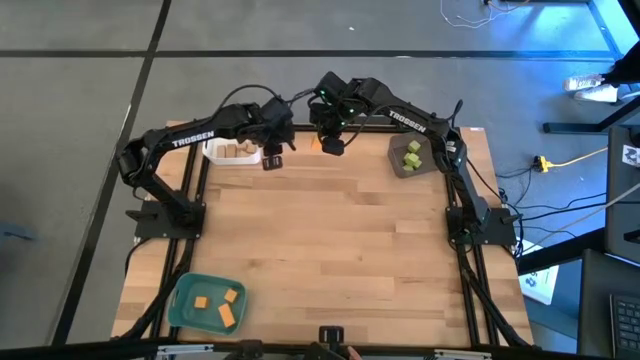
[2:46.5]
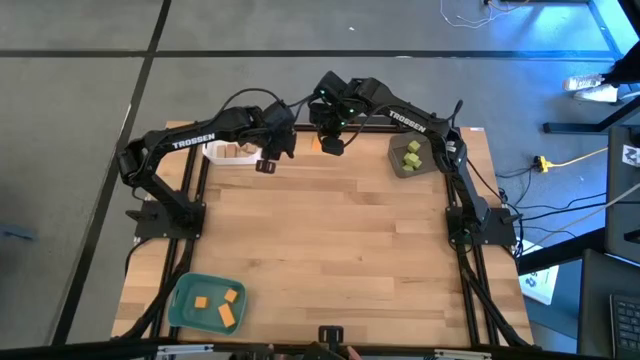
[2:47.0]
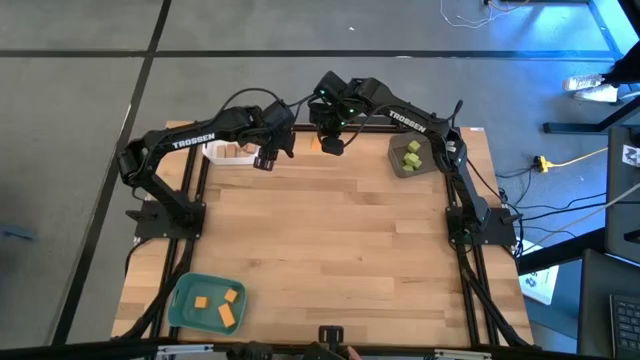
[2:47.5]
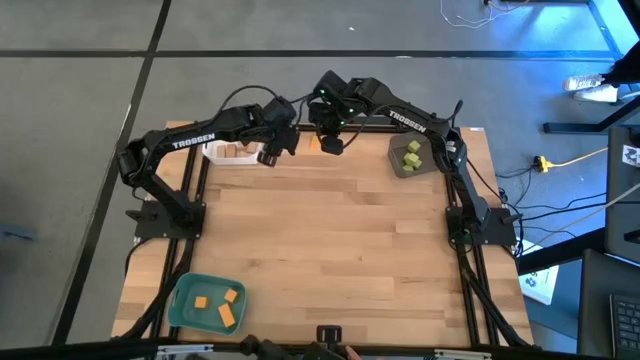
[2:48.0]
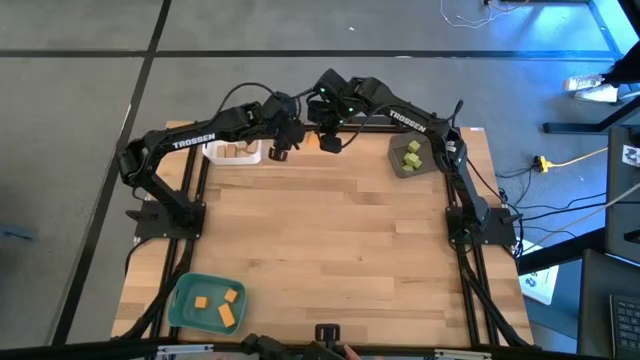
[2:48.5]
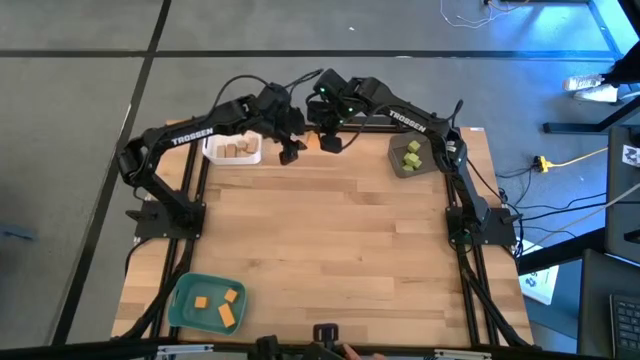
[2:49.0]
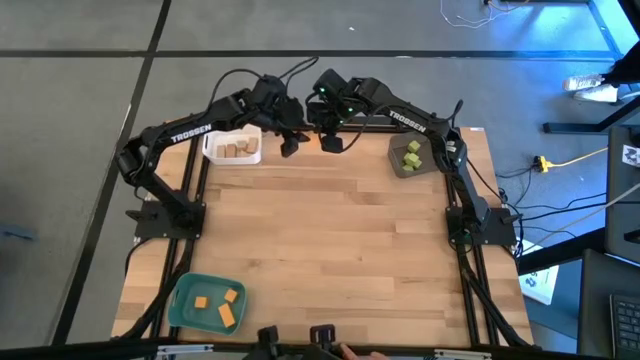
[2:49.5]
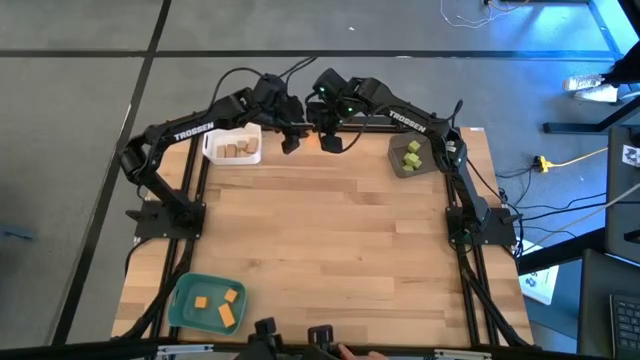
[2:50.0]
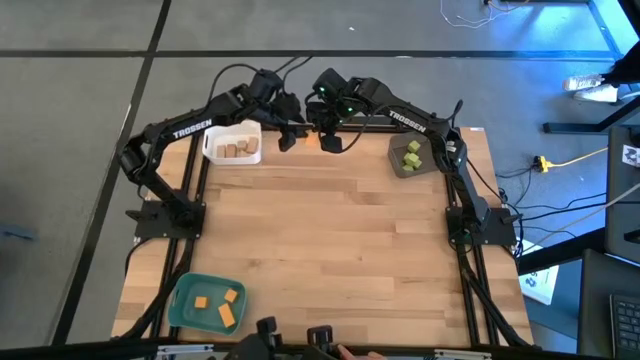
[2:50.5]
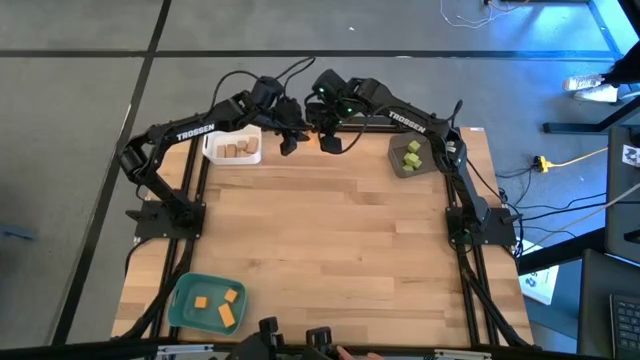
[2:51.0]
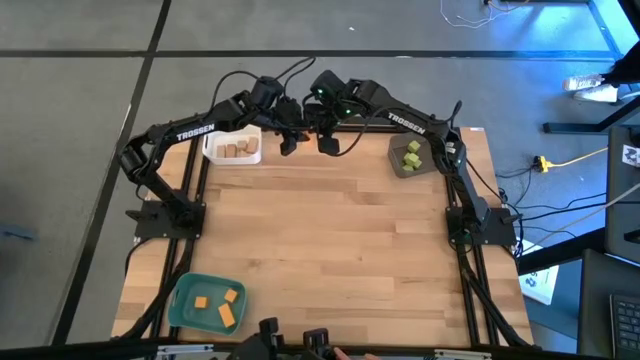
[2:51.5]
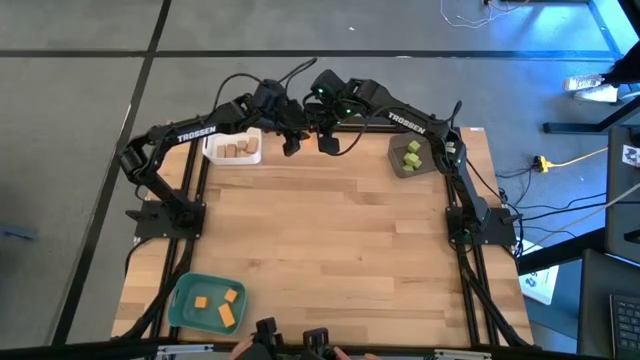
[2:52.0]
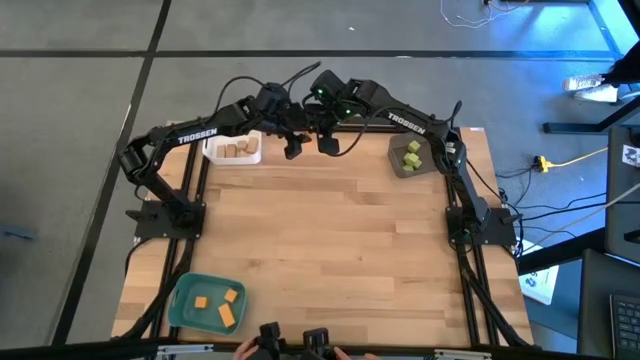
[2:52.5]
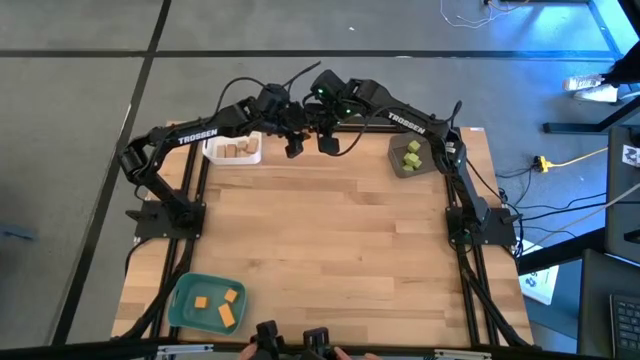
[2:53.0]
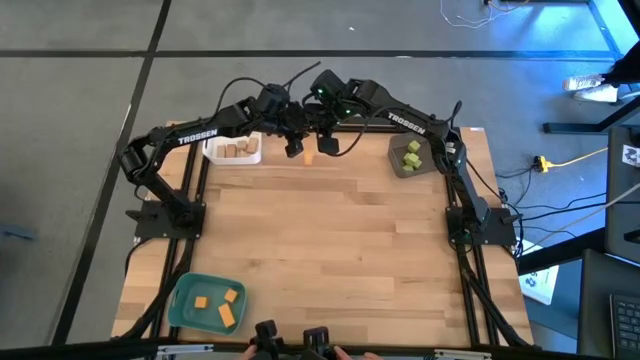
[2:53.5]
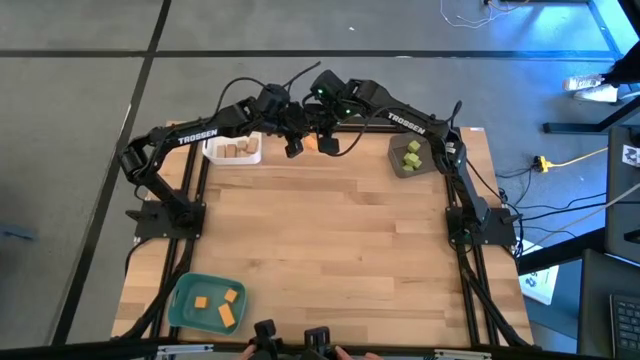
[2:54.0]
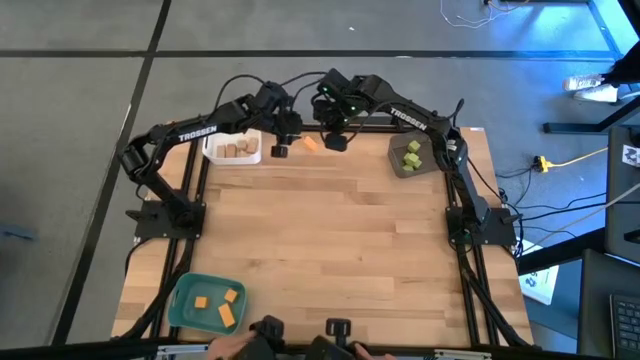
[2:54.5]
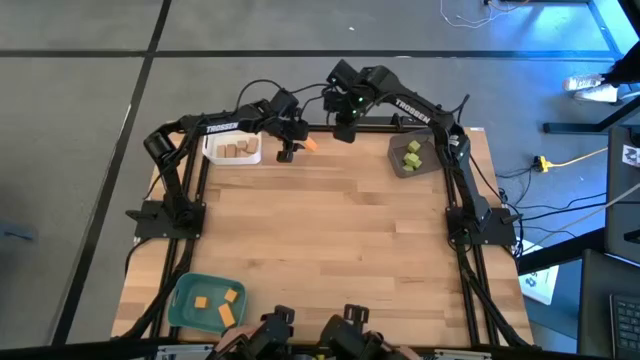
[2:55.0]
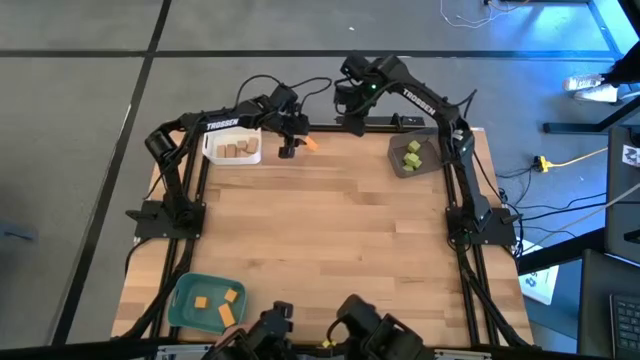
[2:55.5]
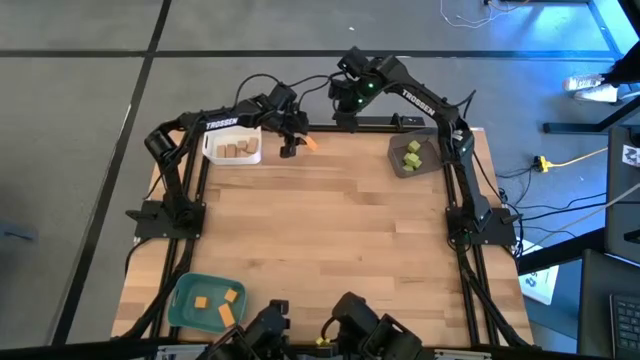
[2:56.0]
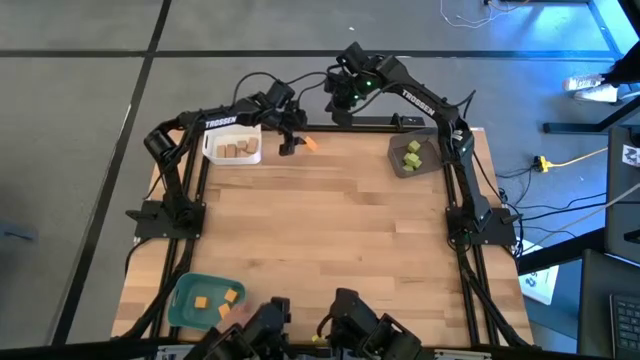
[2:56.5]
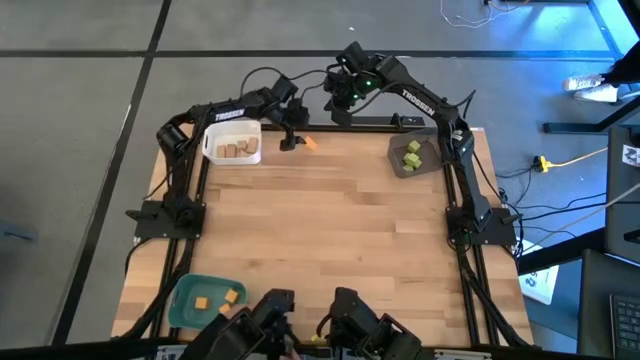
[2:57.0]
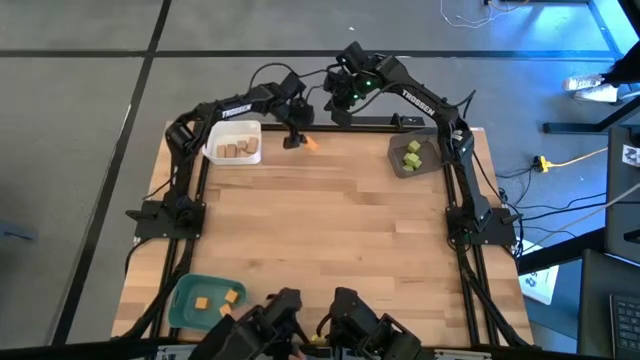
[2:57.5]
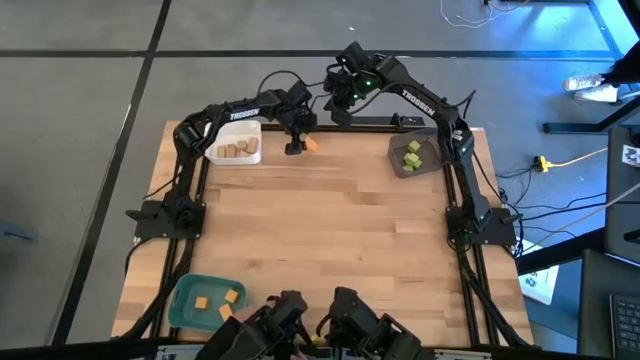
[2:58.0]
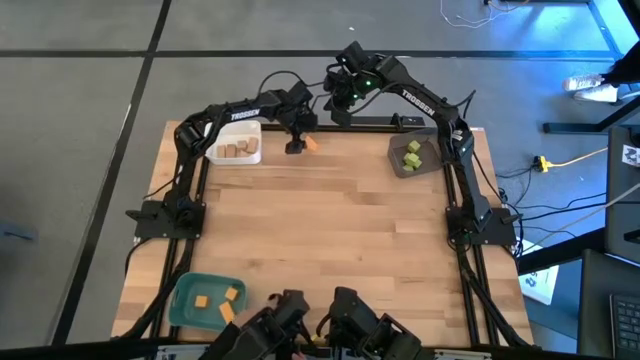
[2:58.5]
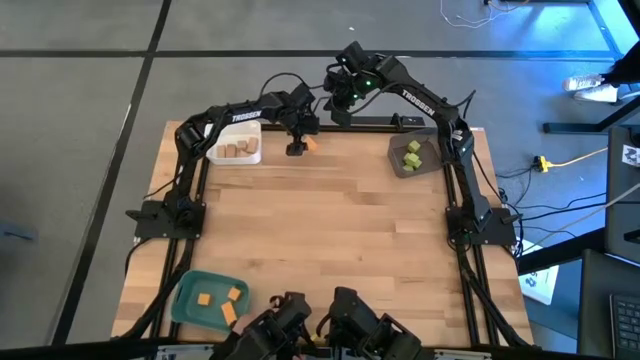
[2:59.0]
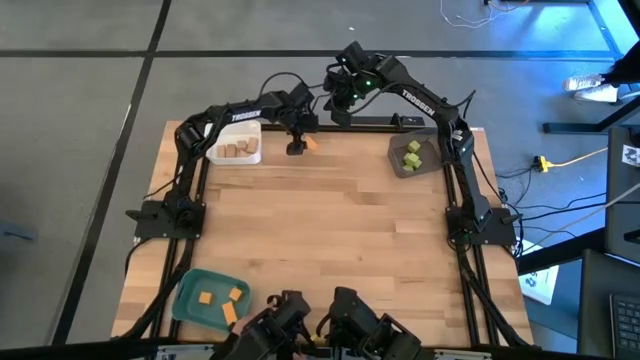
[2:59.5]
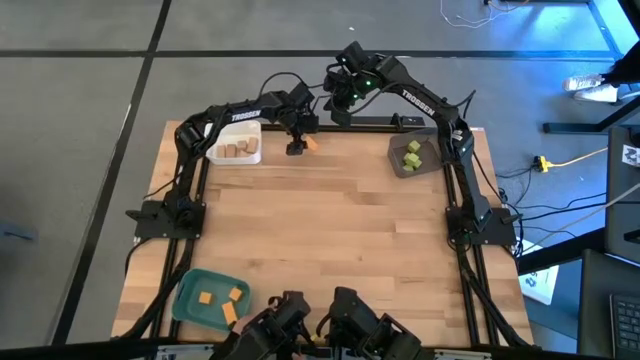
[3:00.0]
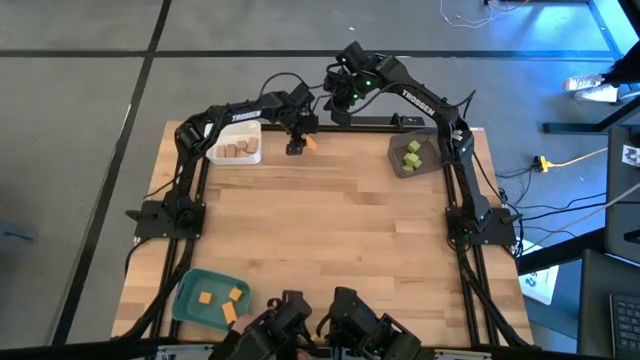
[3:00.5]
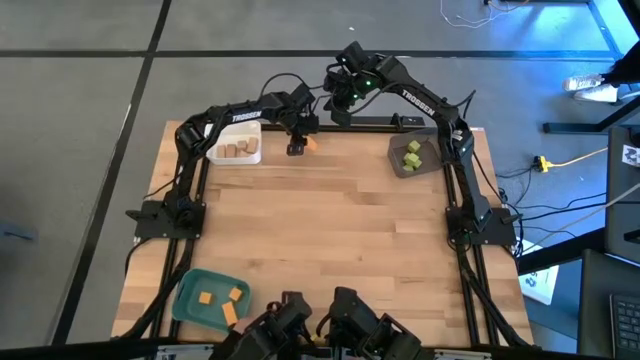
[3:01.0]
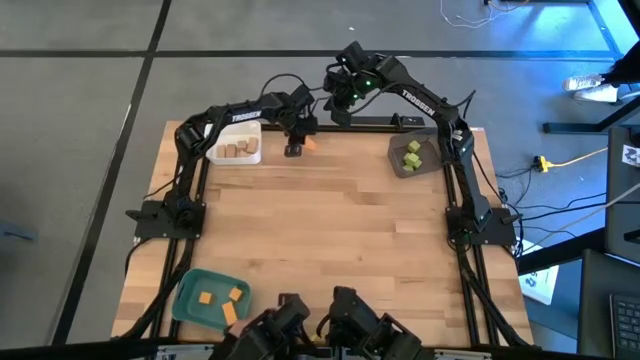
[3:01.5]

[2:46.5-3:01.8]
Task: Sort & place blocks by color
Put the orange block into the green bin

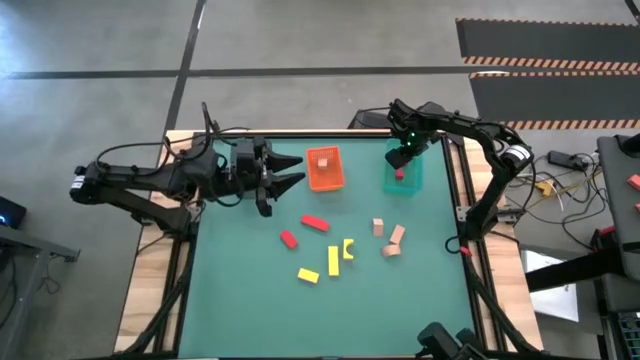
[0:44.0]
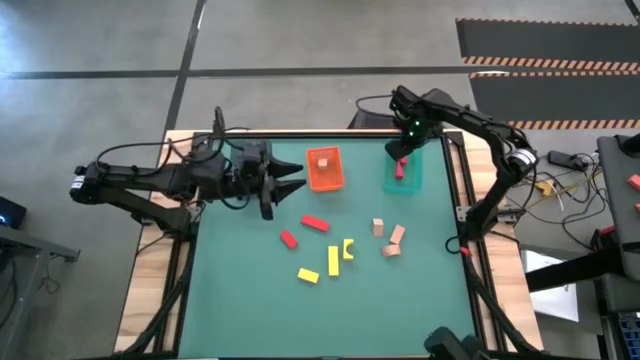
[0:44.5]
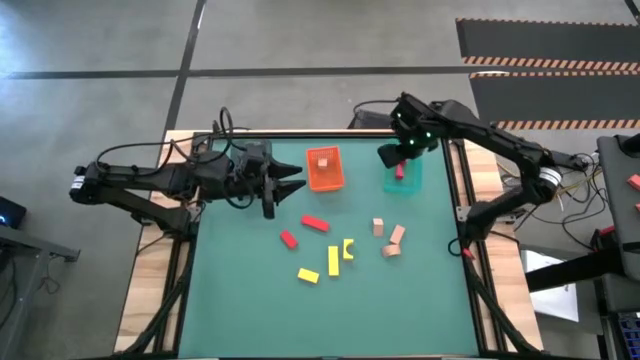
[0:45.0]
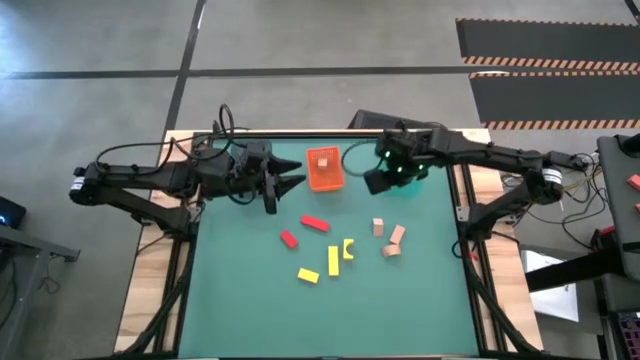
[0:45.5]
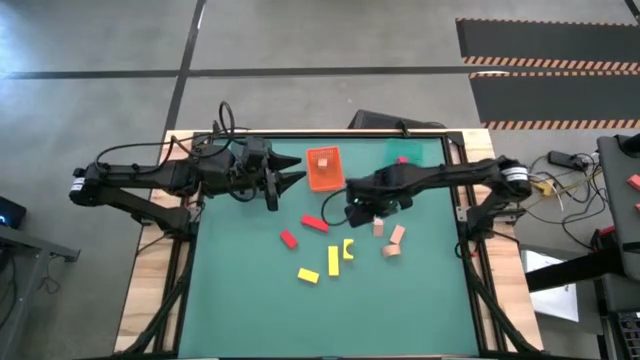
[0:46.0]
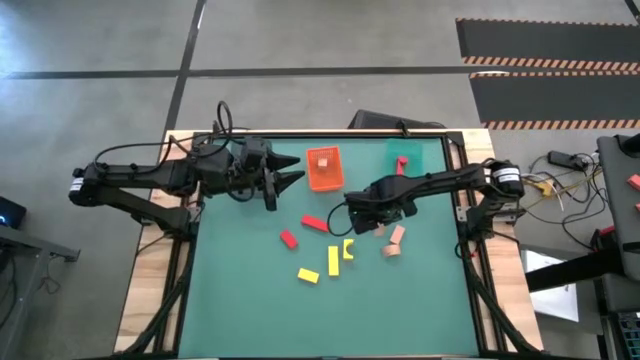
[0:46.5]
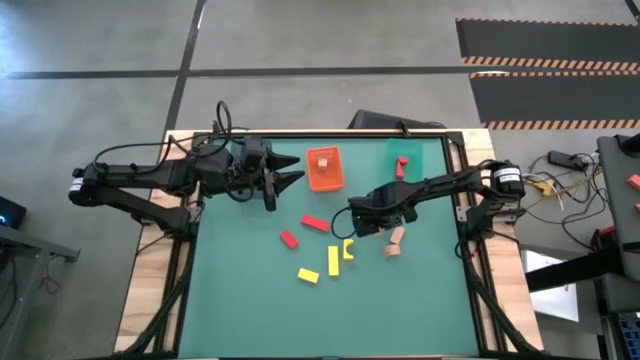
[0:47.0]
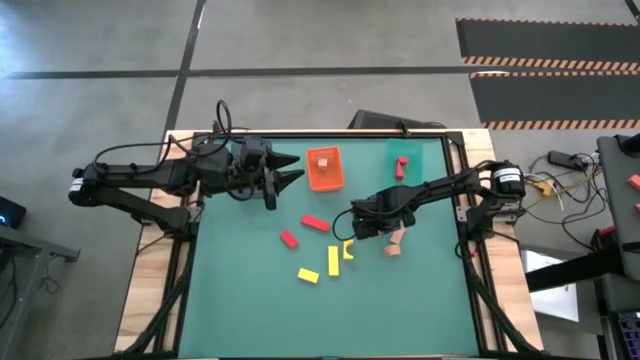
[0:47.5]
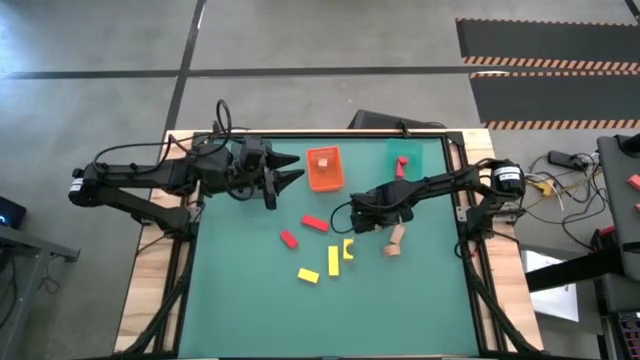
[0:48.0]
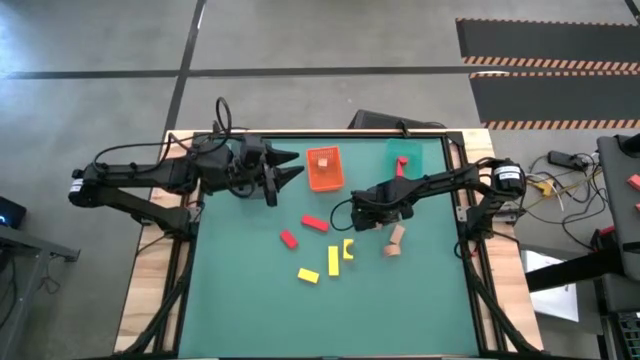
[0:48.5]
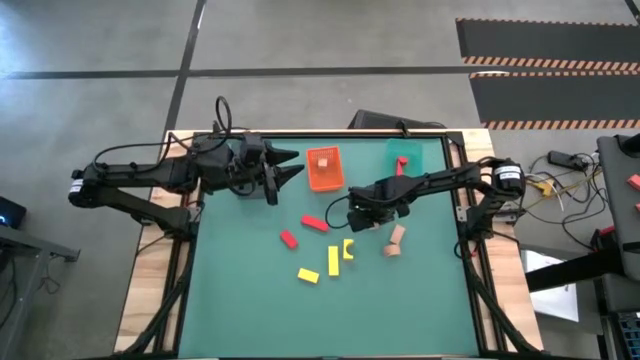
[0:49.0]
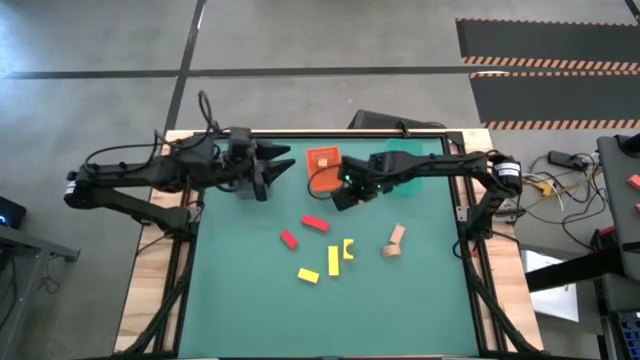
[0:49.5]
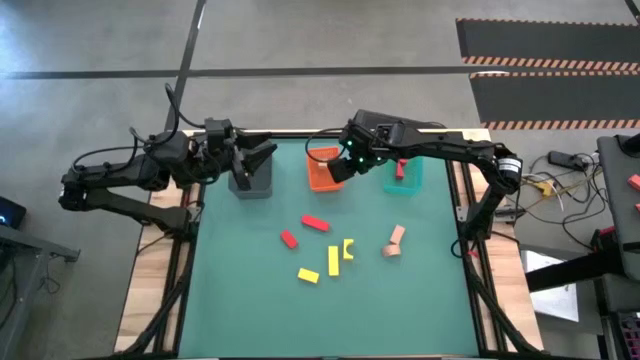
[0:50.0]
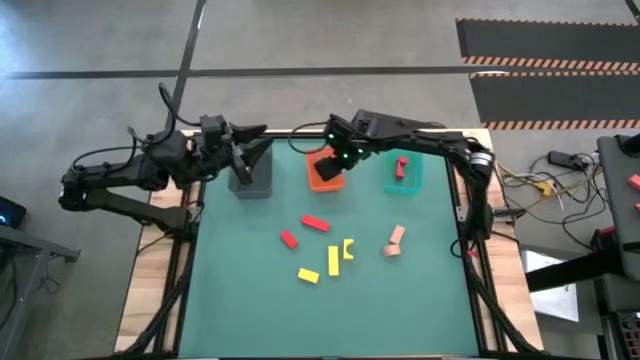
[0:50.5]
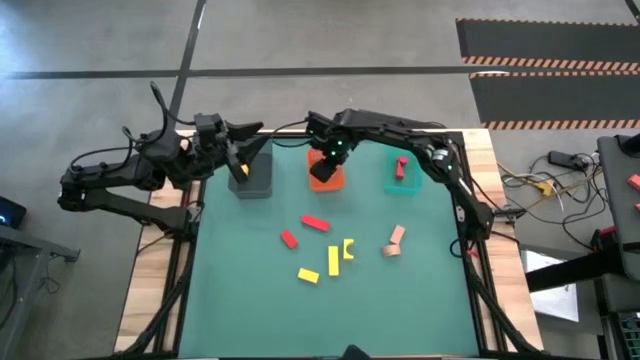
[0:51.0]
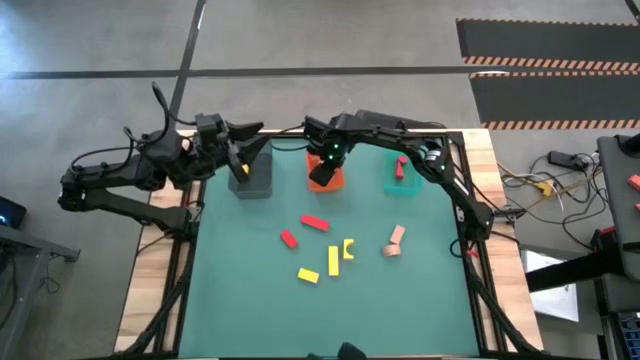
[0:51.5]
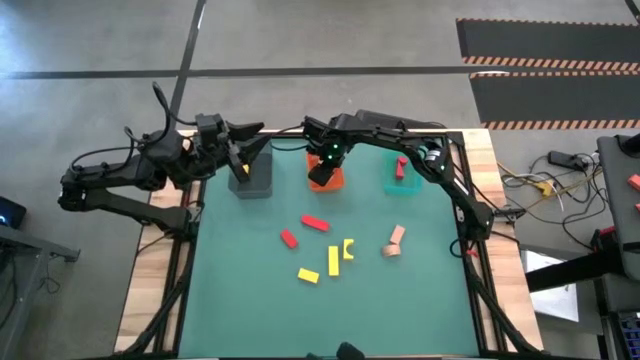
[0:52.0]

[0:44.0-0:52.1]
Task: Sort & place blocks by color
Put the brown block into the orange bin
